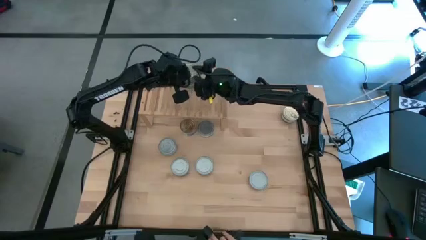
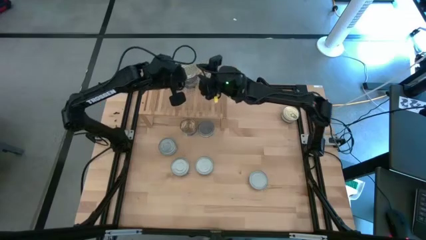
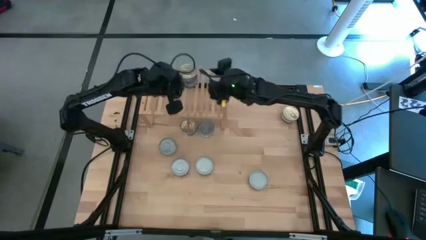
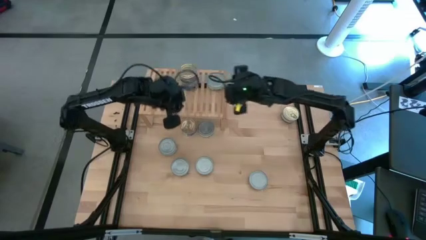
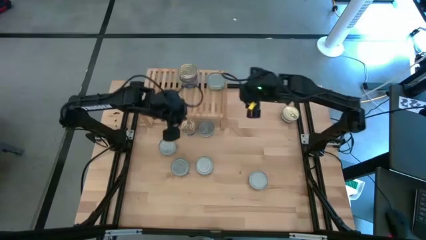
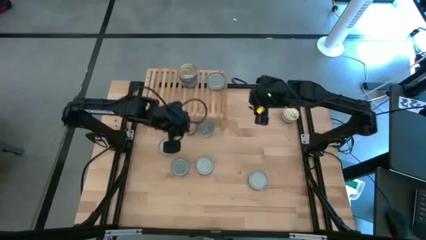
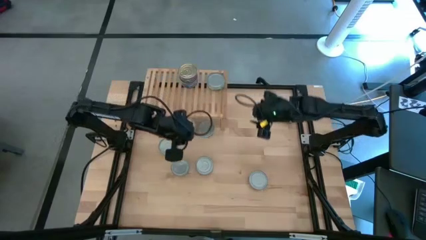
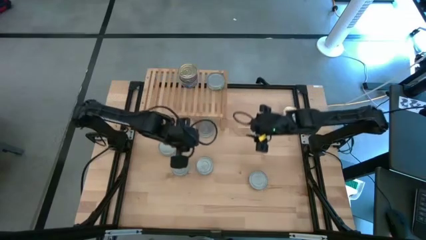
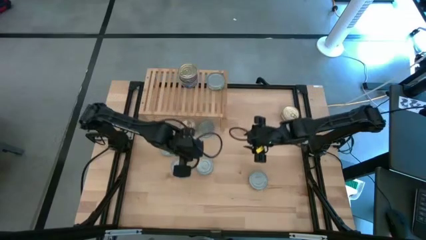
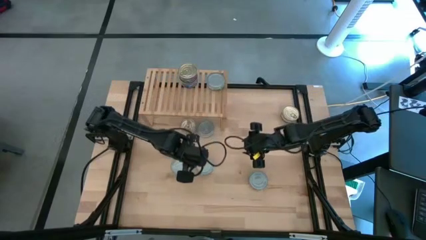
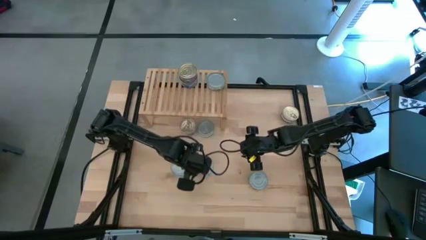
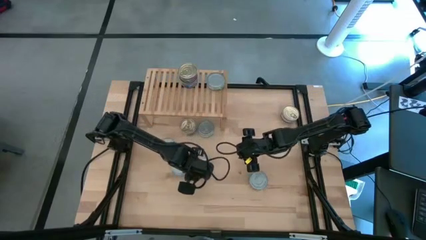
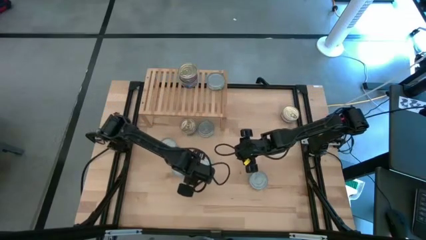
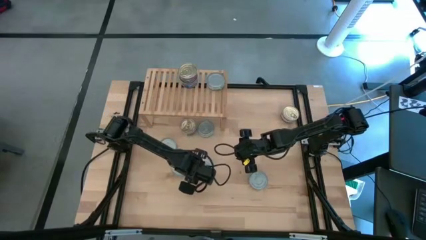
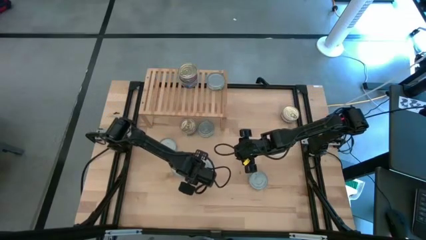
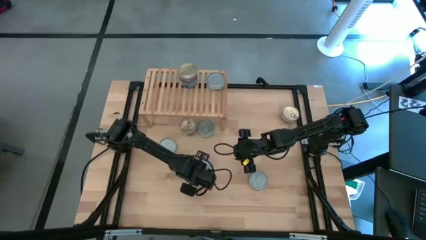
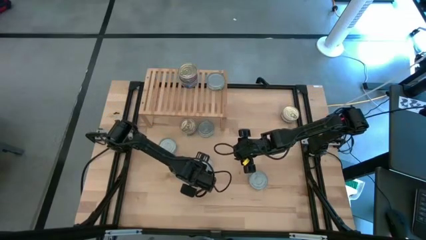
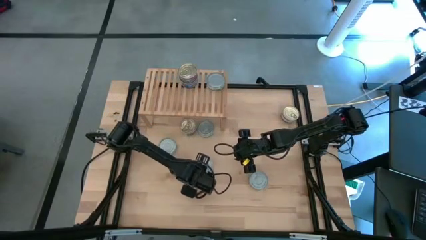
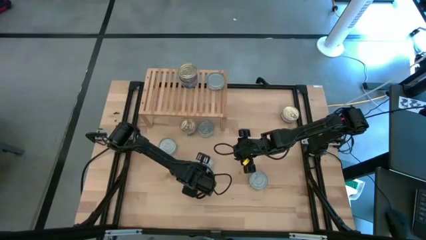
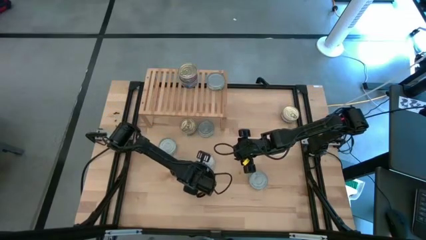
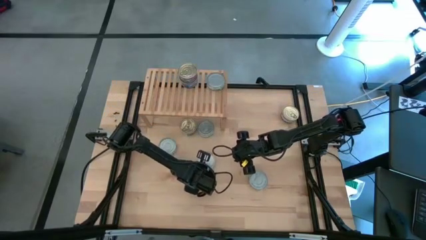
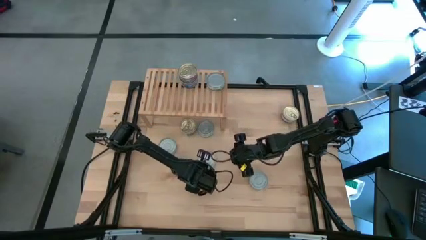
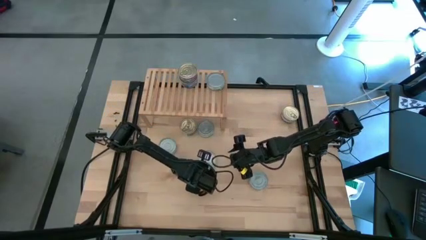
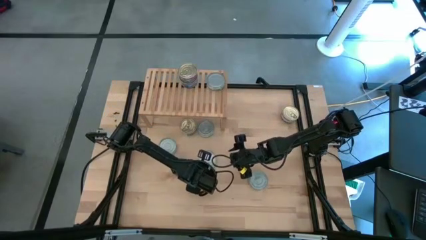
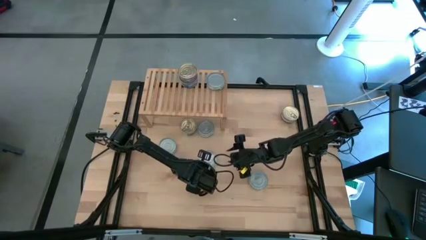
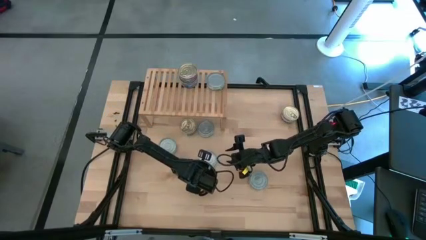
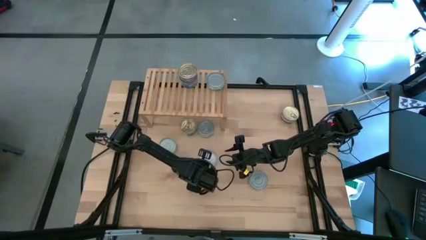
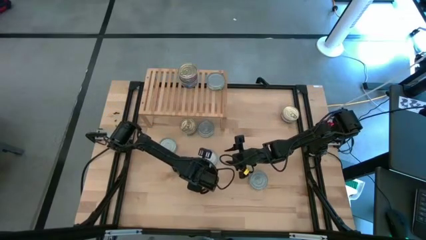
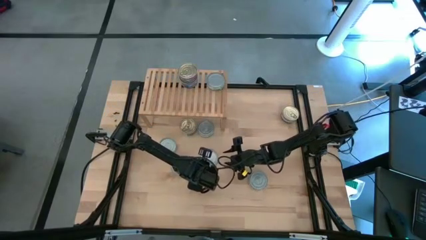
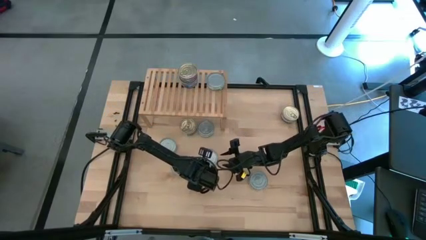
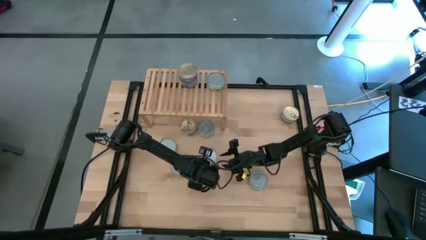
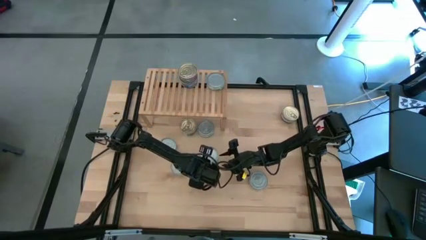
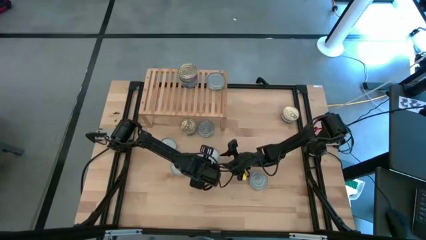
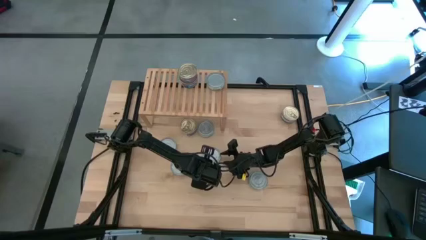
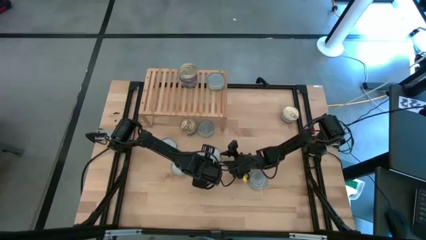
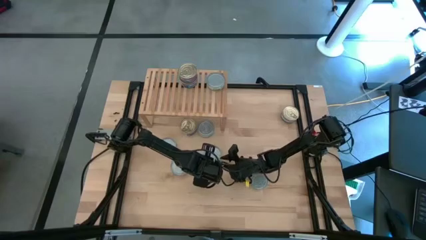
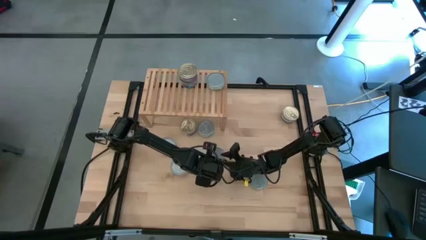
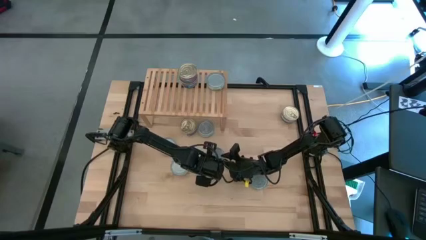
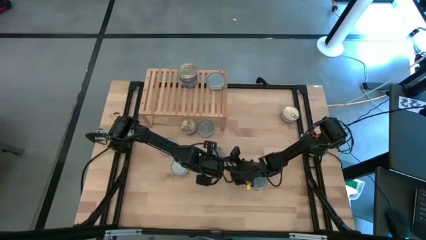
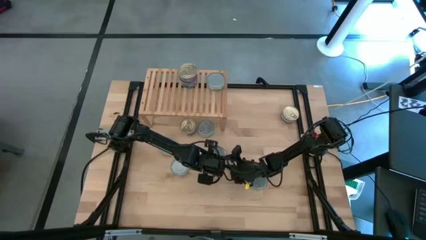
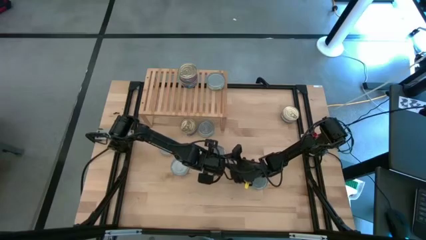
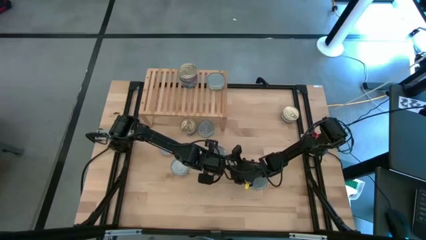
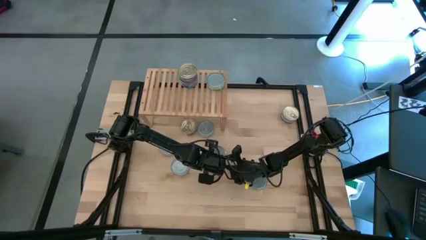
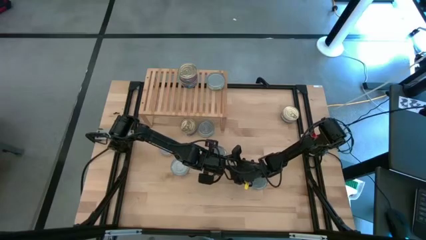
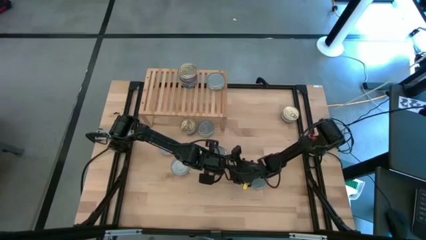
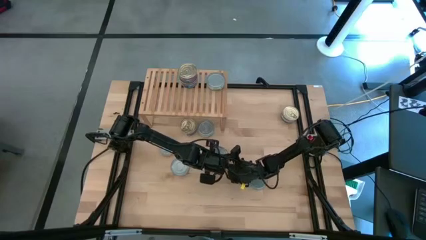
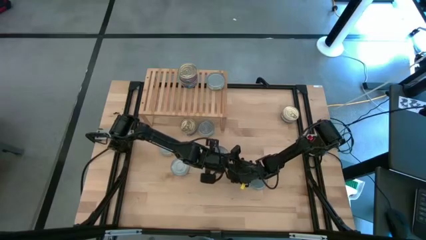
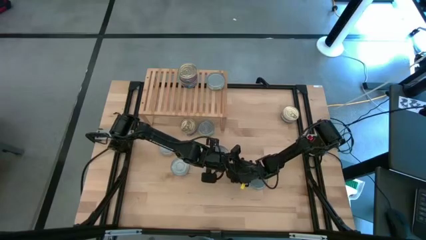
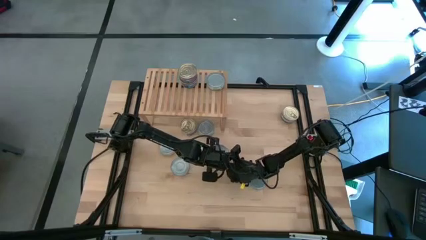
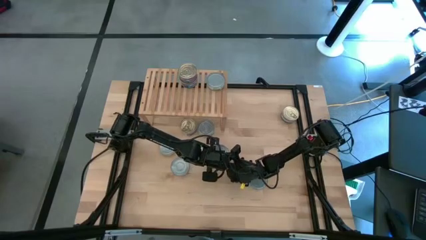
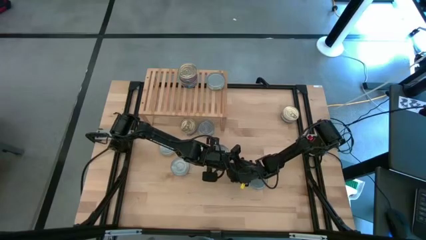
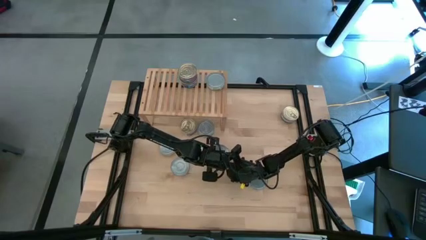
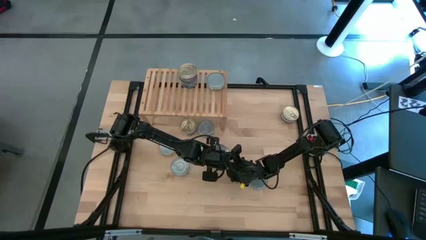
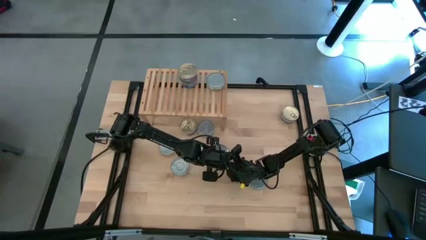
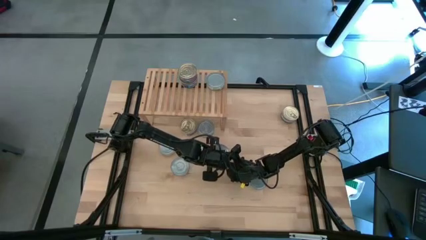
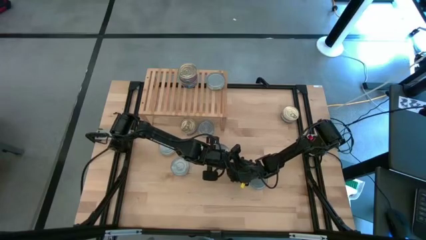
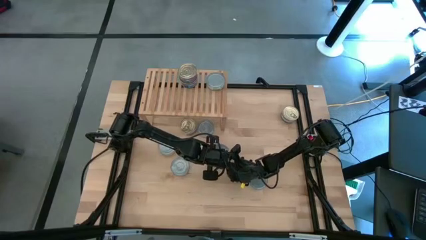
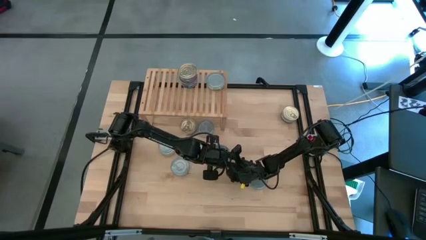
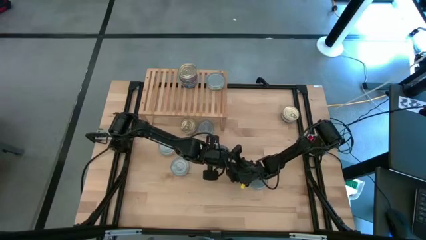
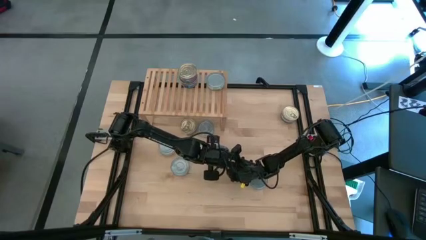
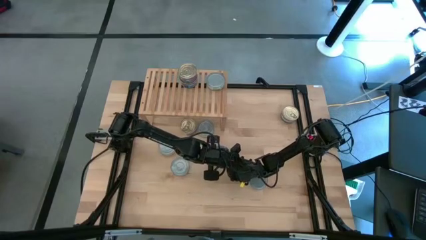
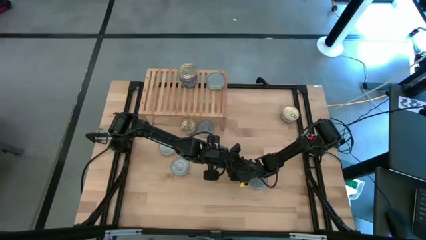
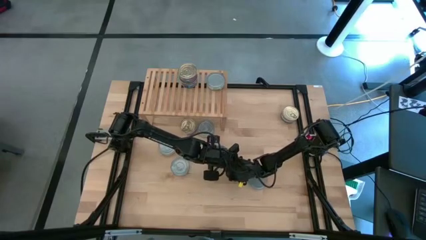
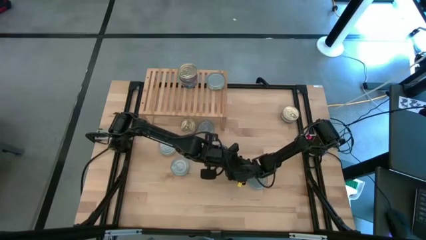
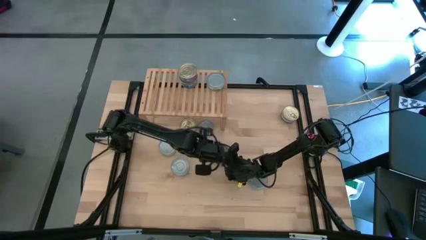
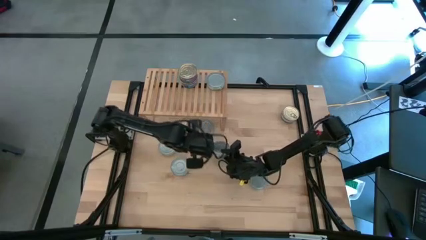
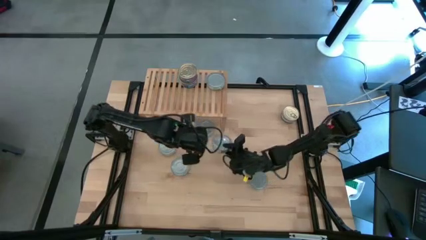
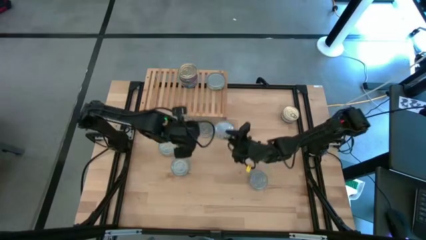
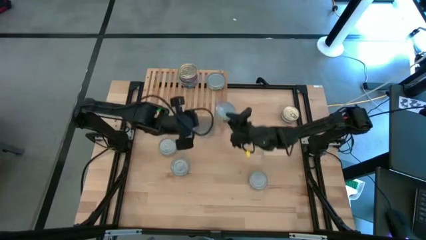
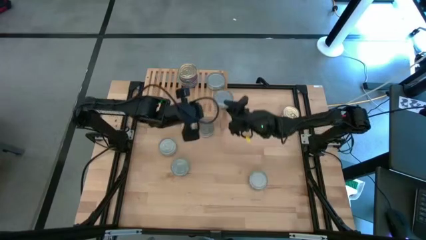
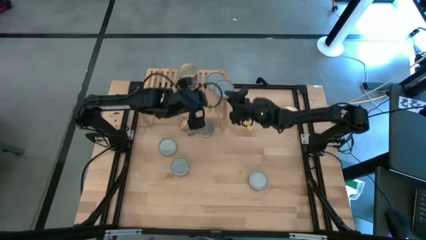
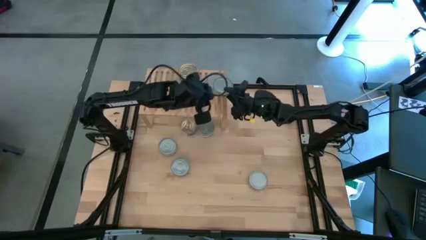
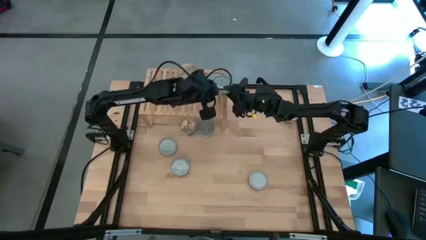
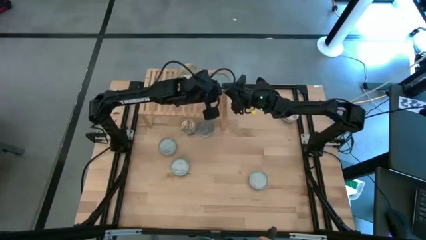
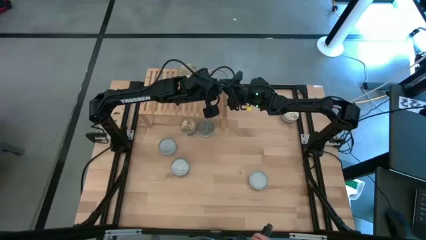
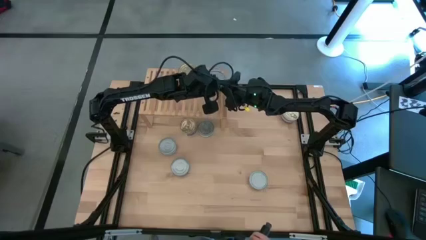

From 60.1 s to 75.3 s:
Task: Stack canned seafood by type on shelf
Stack the green tuna can on top of the green tuna can on the shelf
